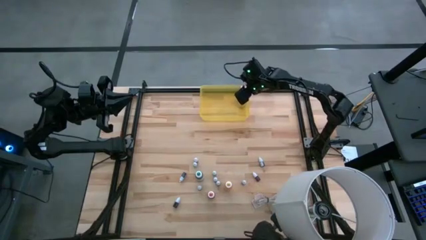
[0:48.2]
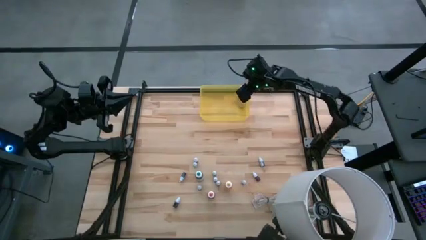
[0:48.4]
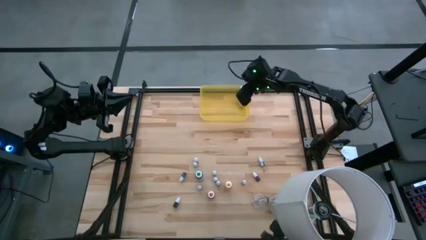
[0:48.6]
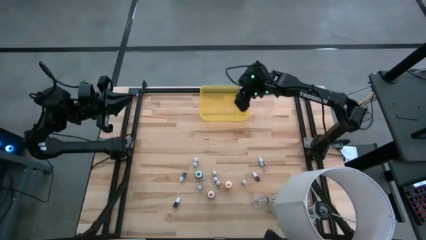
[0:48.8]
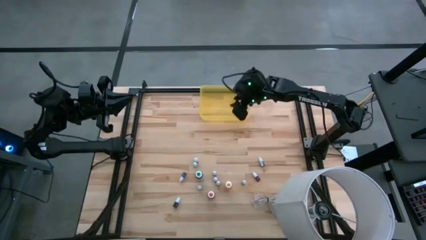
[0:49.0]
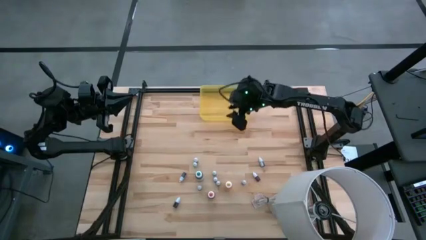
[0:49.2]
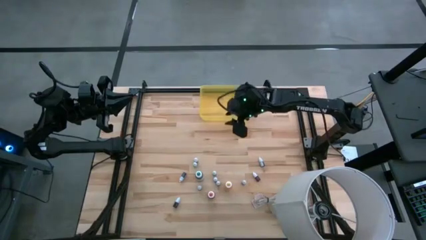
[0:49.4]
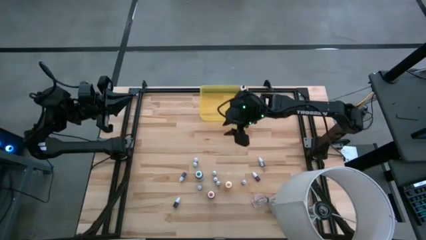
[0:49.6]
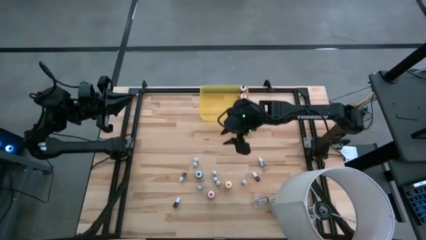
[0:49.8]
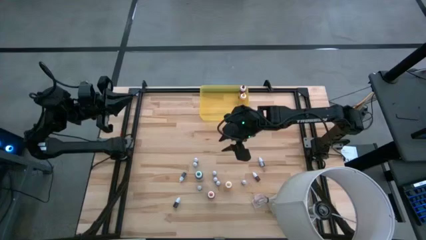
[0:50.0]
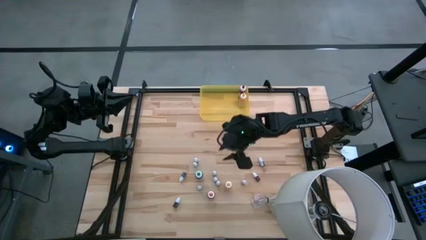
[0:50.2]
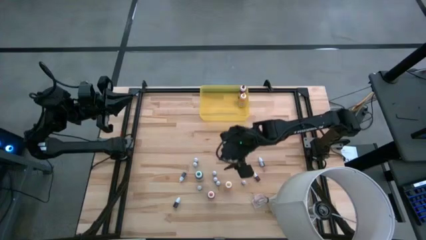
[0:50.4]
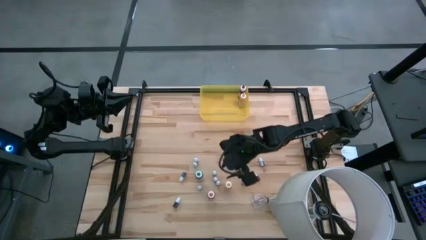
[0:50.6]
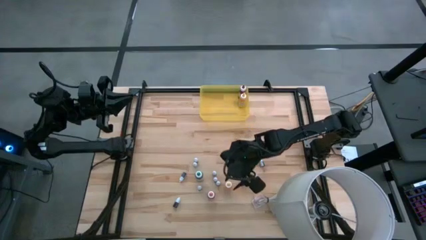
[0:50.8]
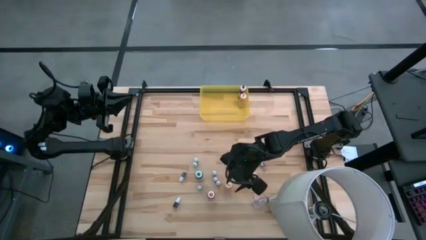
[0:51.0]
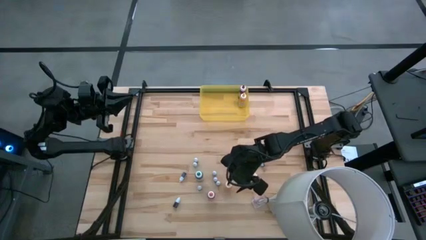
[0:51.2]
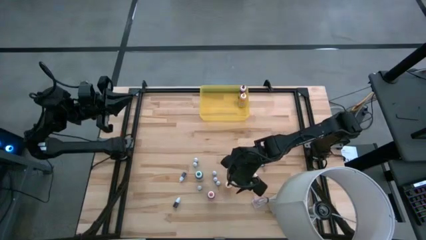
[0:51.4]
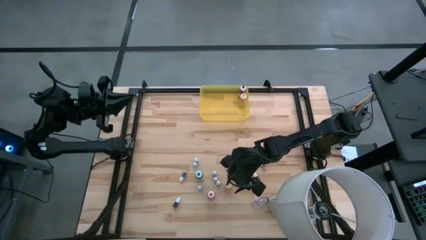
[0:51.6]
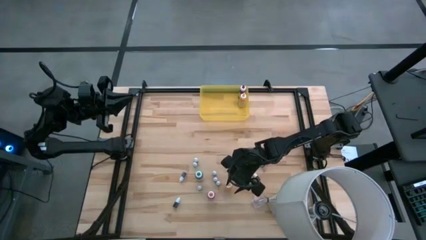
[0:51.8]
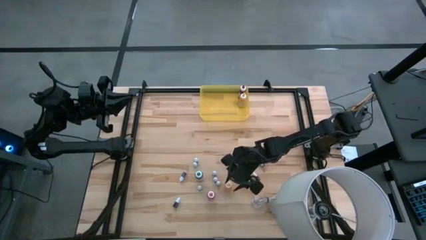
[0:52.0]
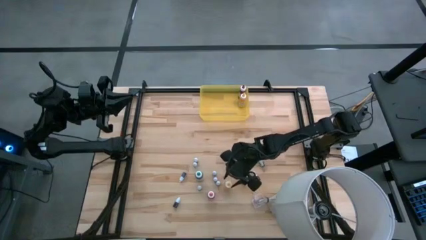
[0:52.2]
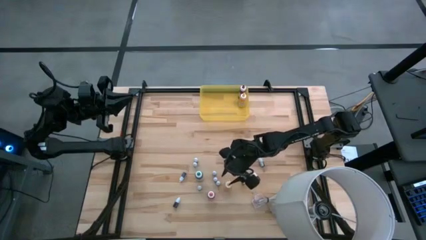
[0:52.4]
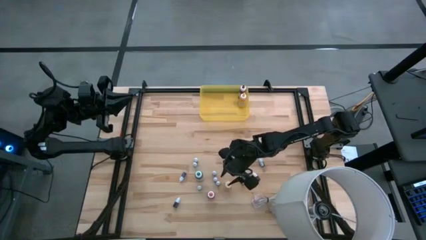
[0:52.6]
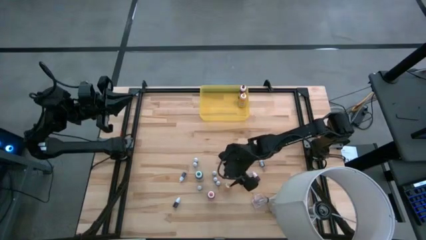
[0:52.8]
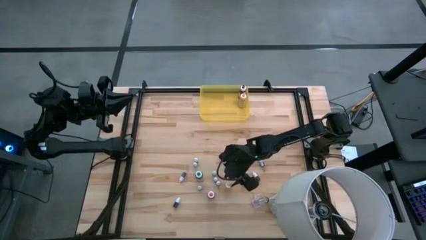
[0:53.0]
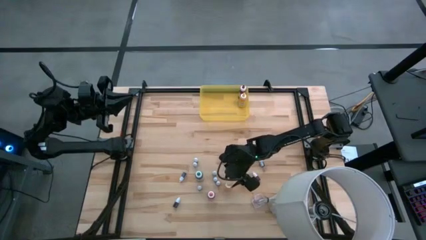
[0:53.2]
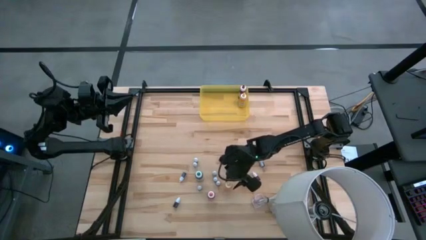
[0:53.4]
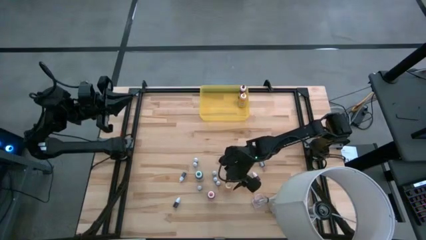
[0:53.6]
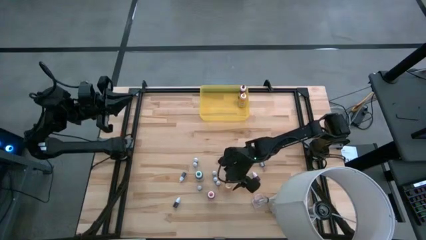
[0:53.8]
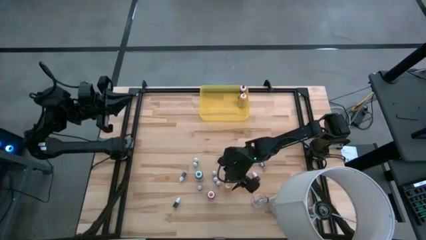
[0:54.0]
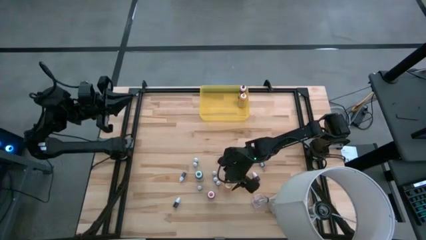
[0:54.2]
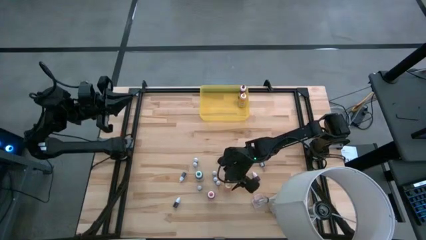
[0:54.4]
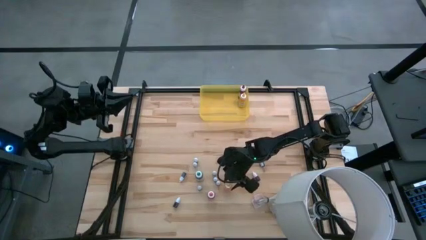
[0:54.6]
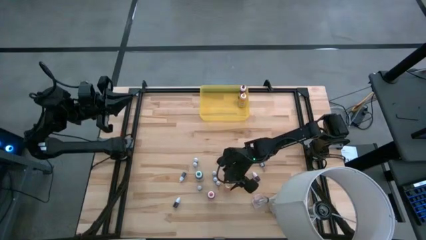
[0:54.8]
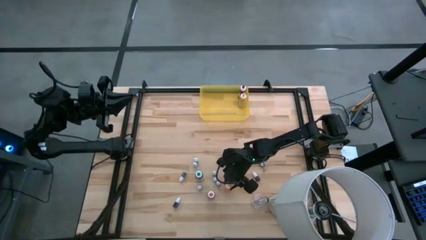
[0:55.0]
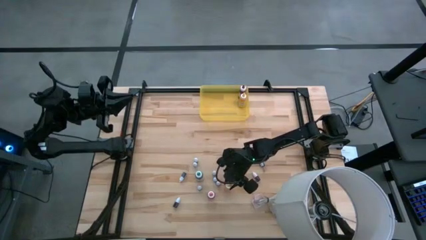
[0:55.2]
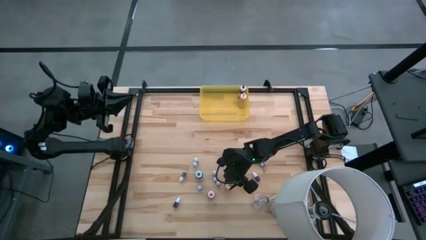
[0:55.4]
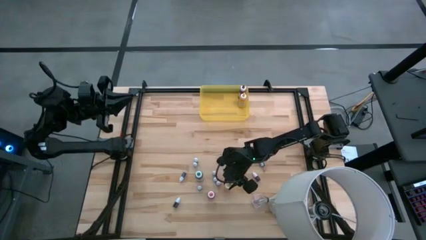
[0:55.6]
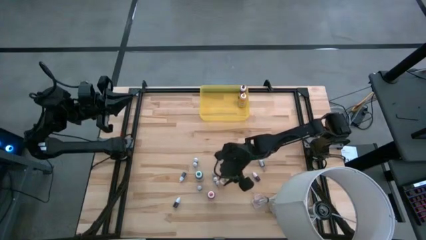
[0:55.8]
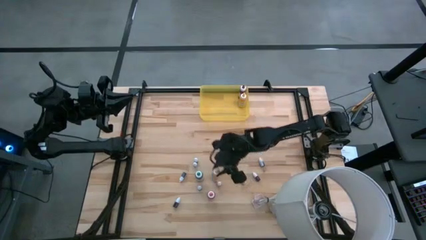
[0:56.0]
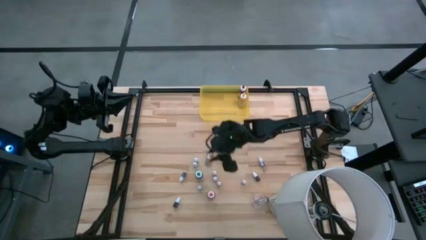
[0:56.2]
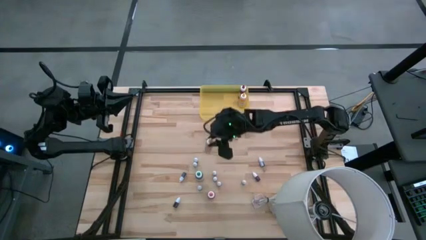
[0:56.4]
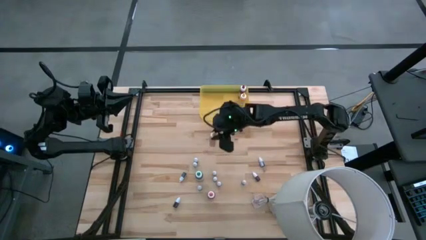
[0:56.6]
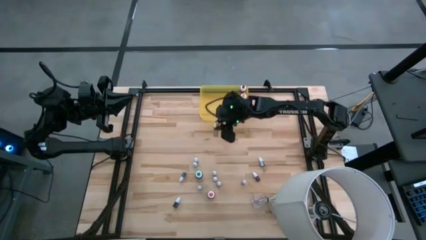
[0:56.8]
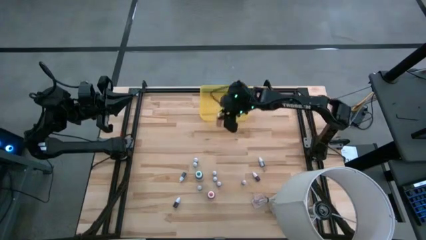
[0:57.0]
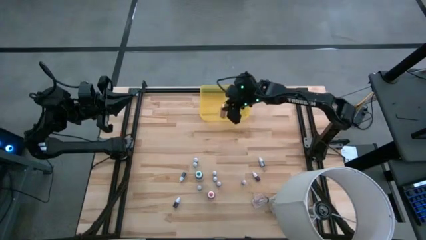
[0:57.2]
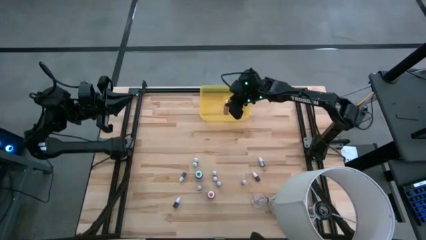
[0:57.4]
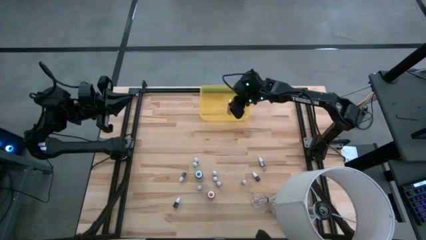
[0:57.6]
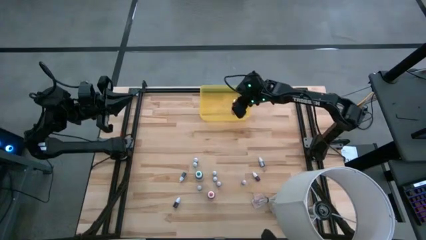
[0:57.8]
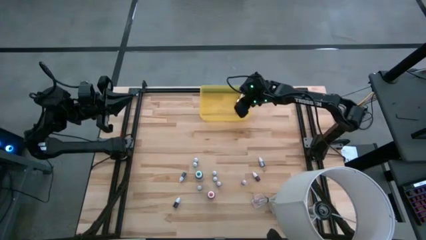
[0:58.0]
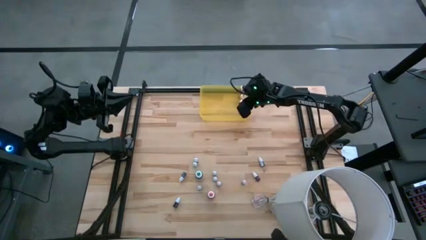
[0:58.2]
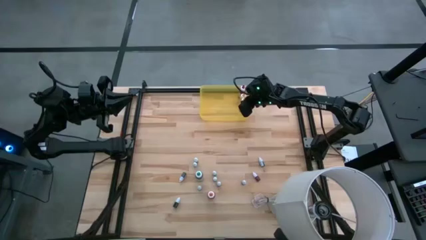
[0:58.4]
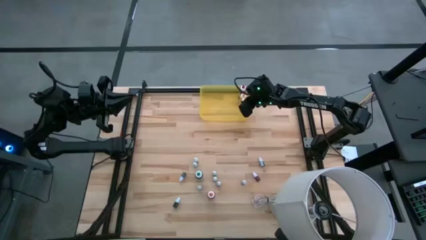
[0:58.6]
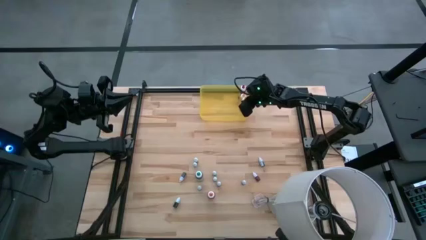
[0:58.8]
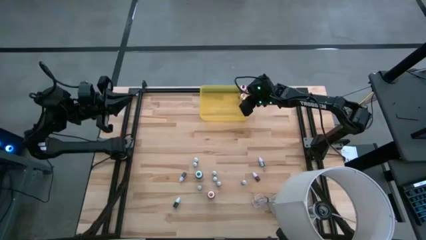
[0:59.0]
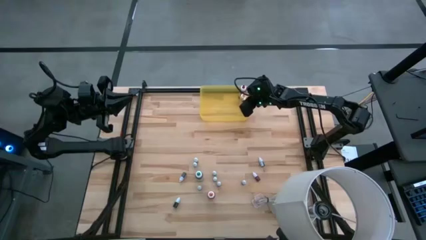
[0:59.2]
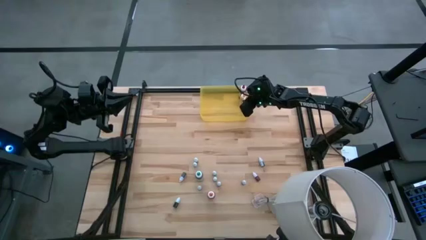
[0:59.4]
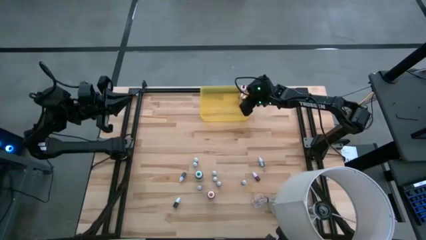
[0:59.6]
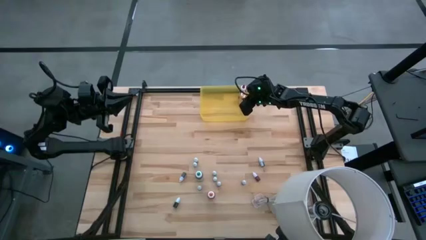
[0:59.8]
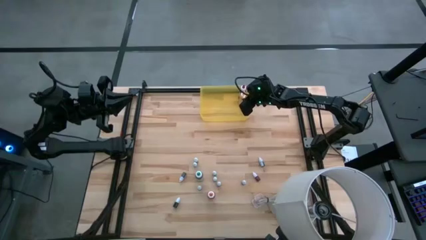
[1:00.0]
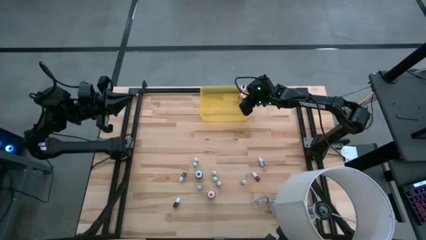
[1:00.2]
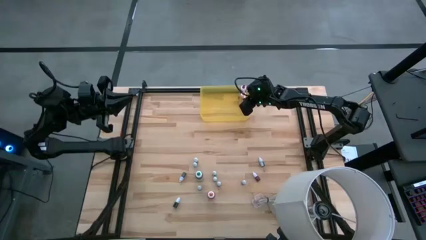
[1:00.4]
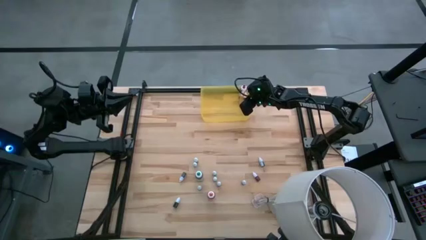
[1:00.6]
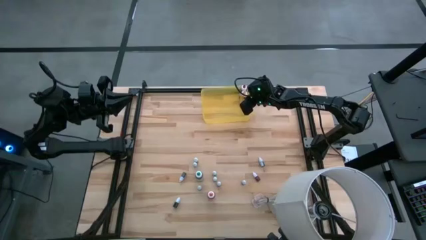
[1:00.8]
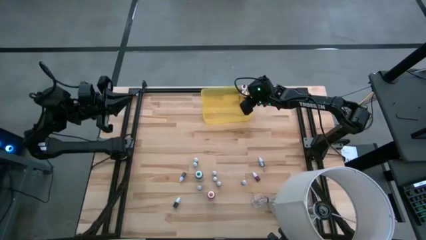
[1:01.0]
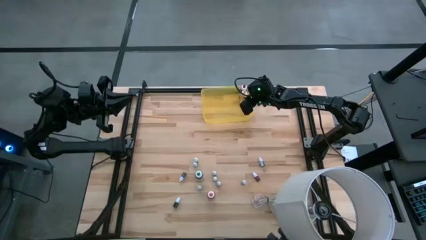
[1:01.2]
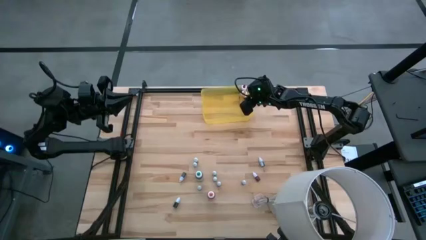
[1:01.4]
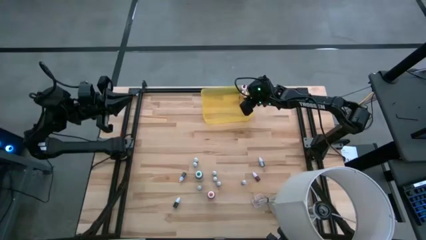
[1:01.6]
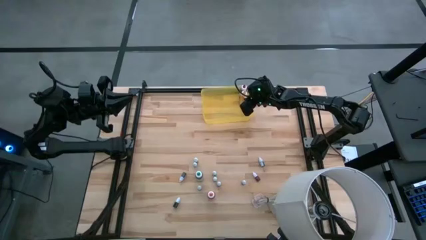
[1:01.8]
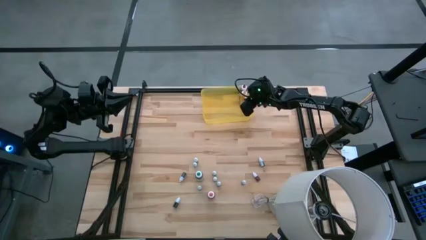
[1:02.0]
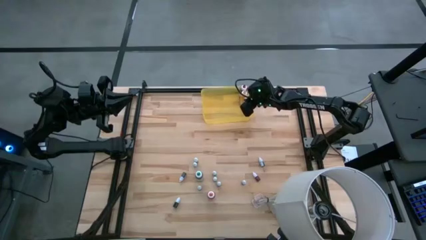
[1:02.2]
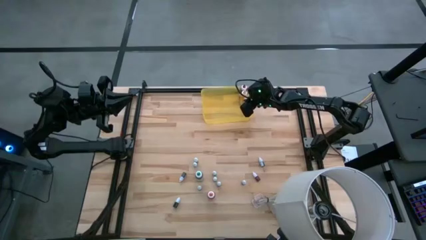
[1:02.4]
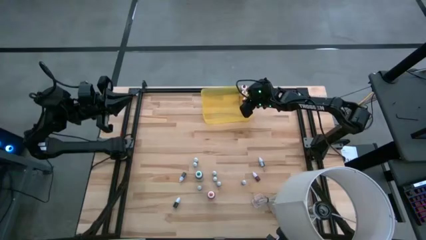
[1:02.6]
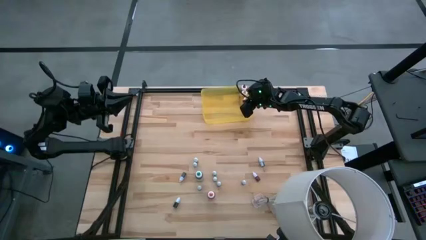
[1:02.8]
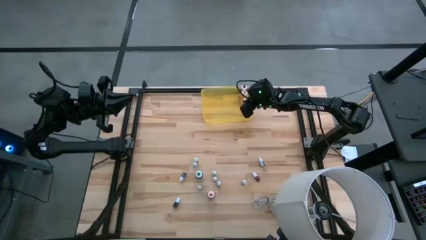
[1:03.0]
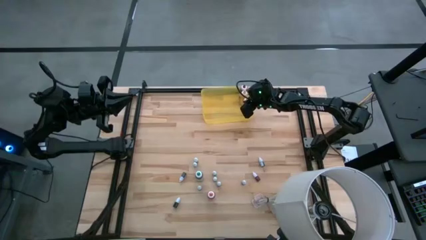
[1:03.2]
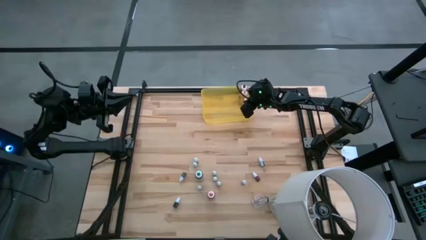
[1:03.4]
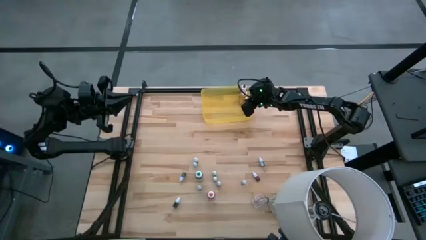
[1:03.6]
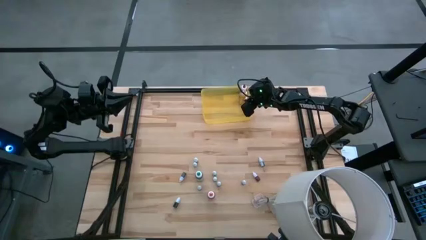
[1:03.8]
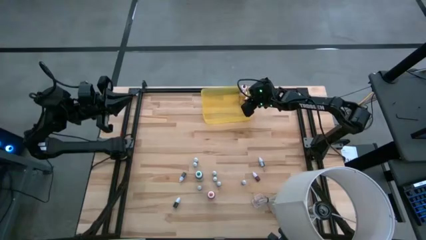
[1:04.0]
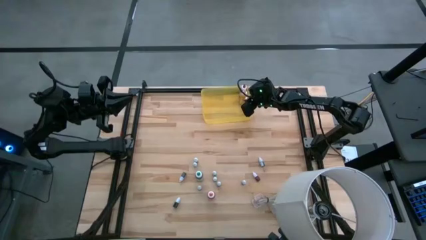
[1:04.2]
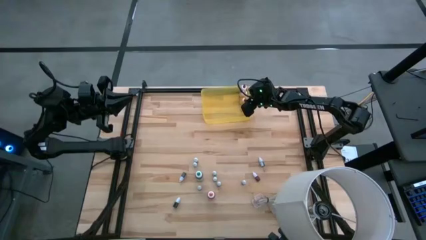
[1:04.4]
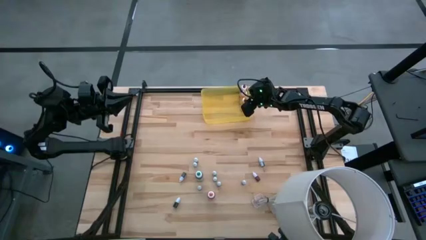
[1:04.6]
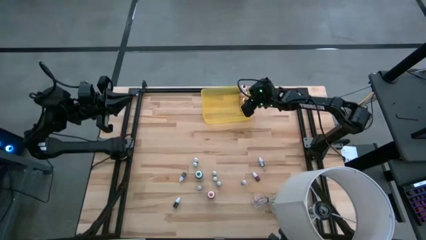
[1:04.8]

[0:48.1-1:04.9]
Task: Pick & Place food coloring
Put the large yellow food coloring bottle into the yellow bin
